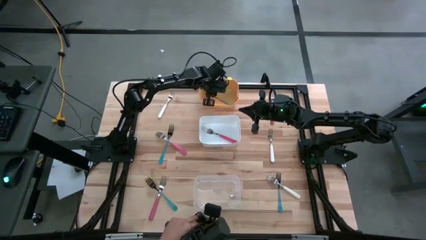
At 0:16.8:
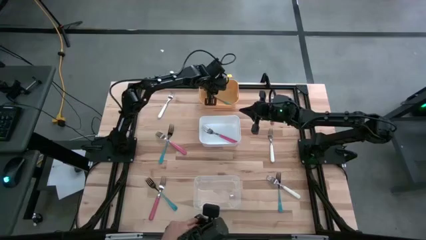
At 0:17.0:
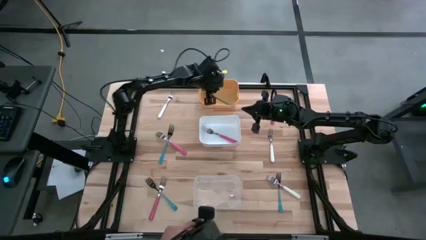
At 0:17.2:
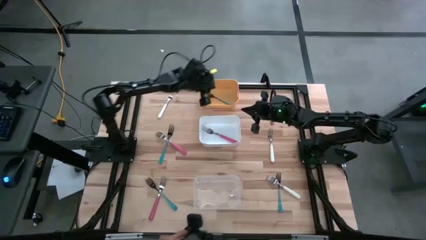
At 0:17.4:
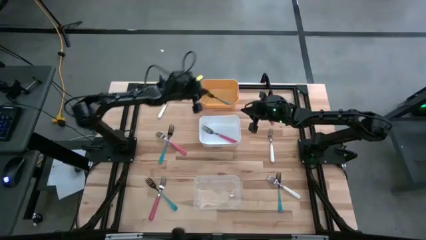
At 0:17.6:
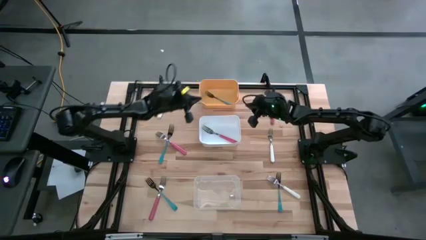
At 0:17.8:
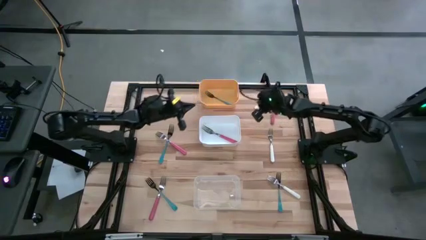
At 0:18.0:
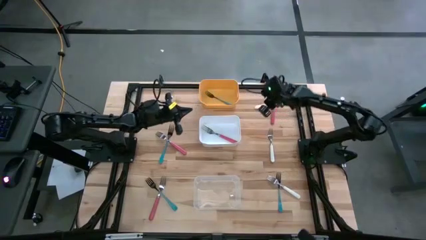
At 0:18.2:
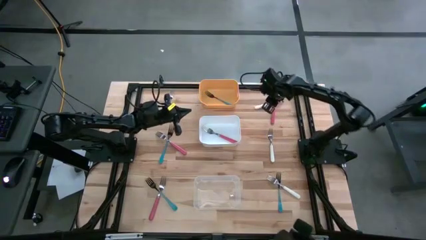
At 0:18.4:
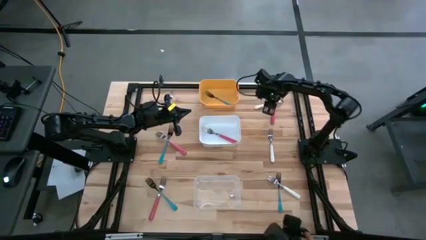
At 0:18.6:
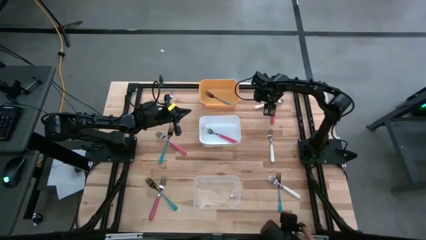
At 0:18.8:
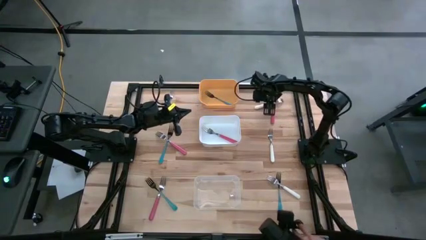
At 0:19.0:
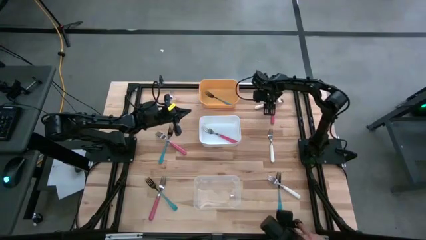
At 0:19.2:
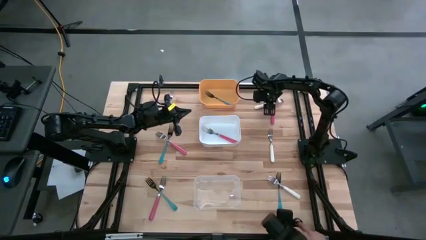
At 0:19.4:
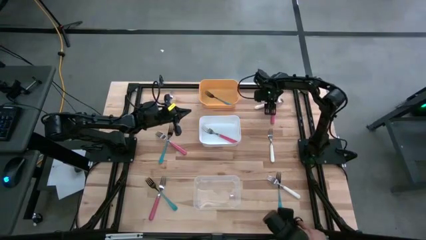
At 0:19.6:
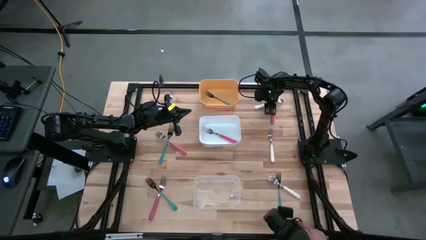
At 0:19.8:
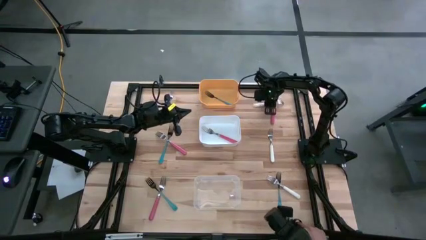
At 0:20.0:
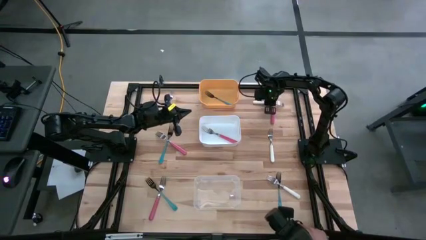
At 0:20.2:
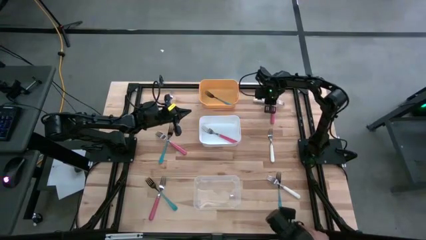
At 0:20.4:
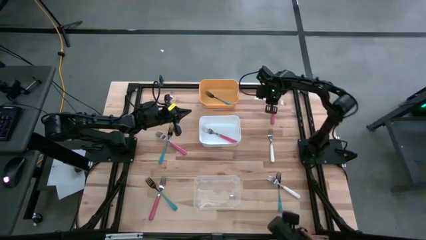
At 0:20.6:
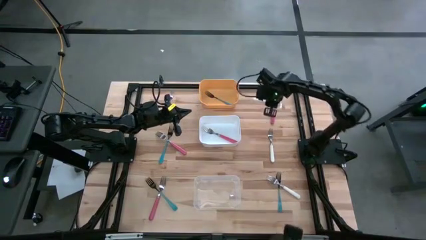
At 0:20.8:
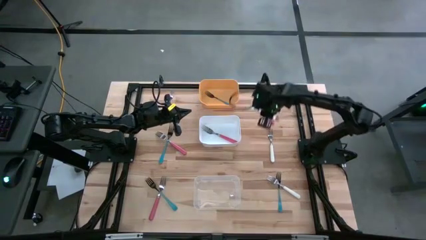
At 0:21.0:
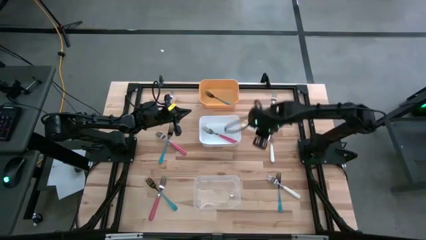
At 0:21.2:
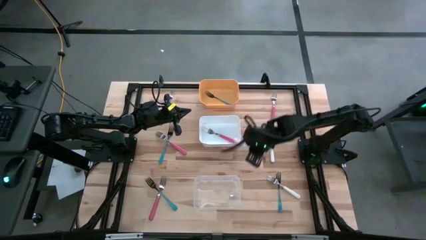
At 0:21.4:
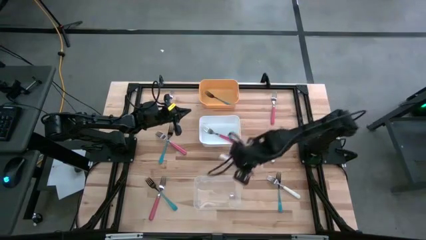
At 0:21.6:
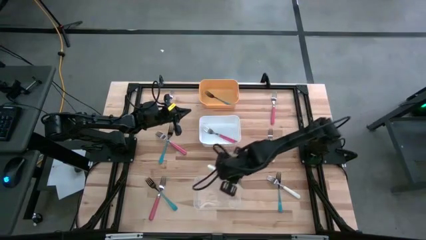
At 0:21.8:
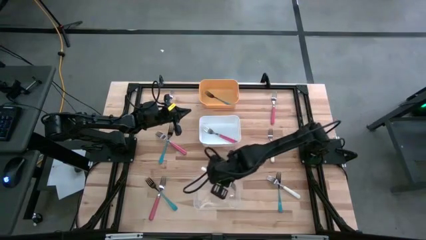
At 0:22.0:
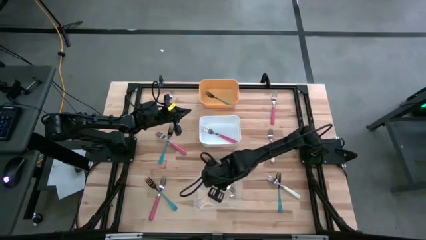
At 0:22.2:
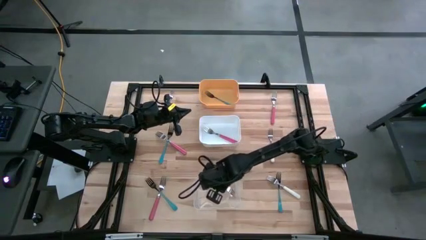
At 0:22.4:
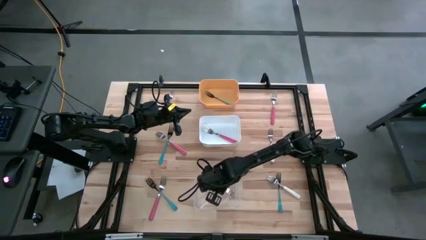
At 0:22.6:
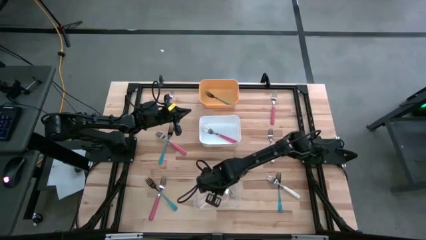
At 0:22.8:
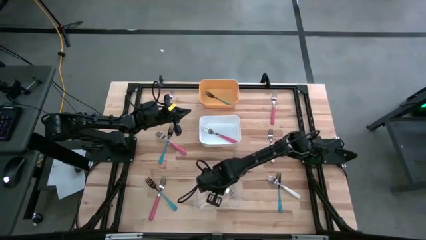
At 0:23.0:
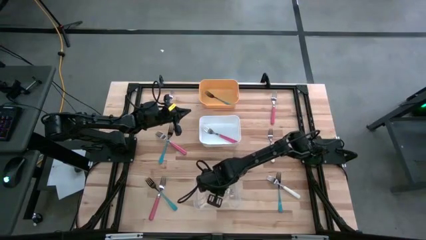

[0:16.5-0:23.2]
Task: Sort silverware by color (type)
Put the top right white fork into the transparent bin

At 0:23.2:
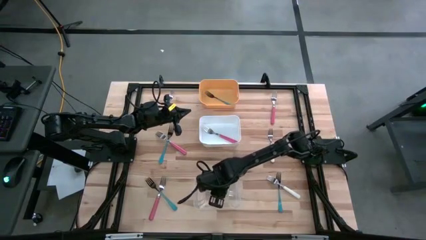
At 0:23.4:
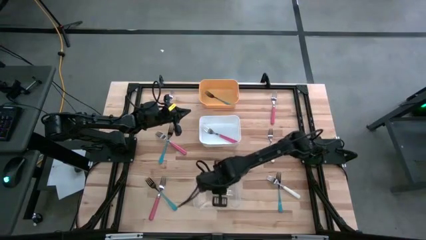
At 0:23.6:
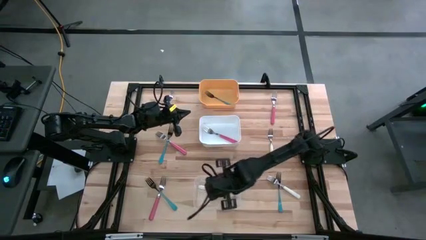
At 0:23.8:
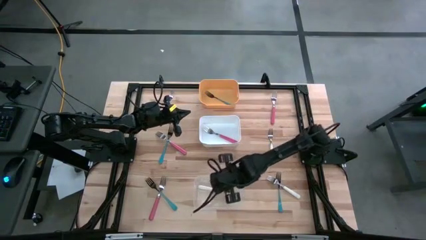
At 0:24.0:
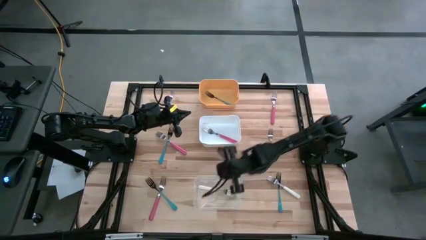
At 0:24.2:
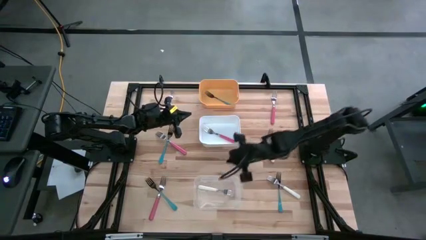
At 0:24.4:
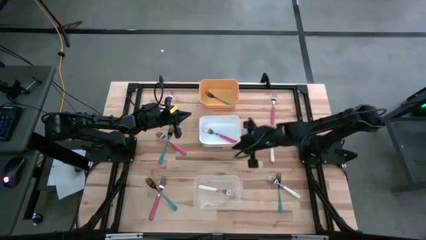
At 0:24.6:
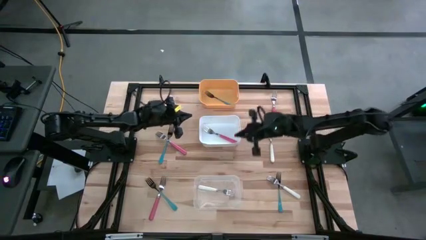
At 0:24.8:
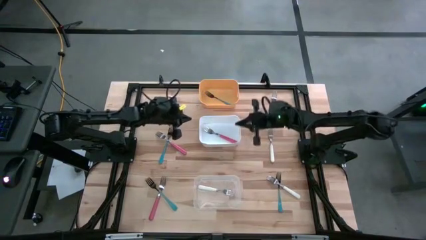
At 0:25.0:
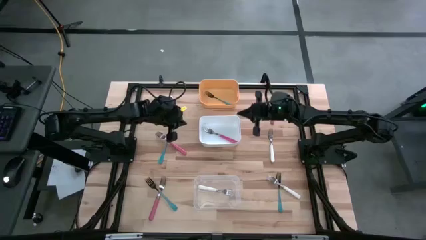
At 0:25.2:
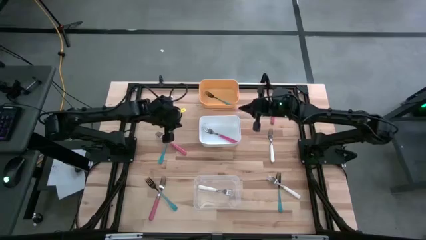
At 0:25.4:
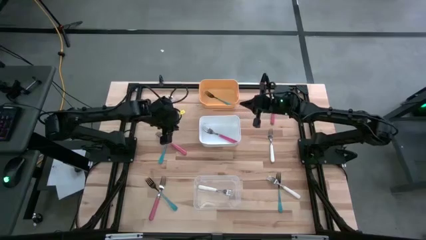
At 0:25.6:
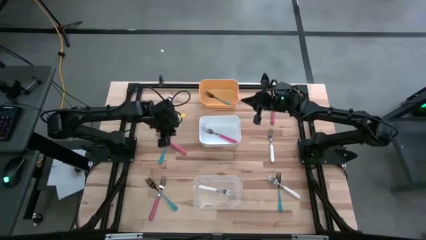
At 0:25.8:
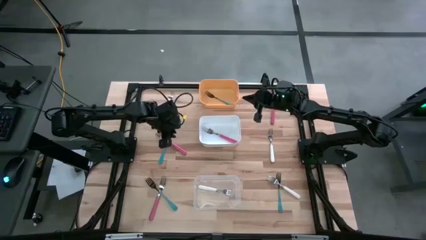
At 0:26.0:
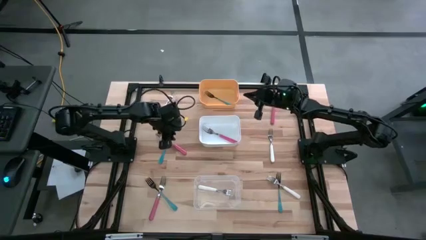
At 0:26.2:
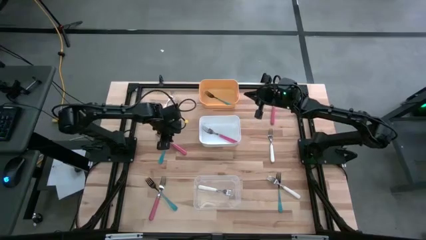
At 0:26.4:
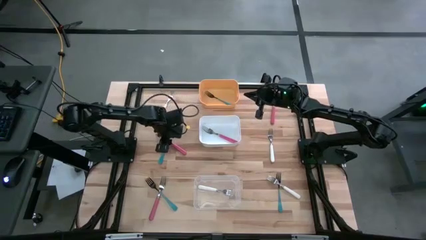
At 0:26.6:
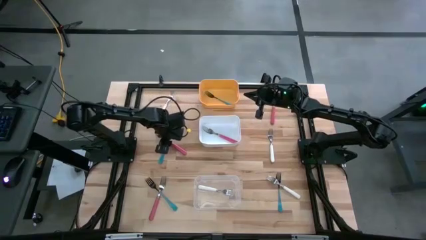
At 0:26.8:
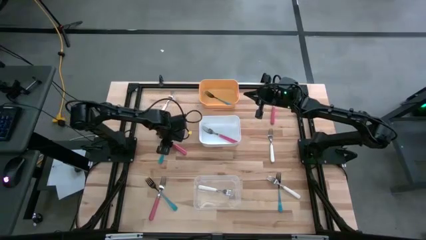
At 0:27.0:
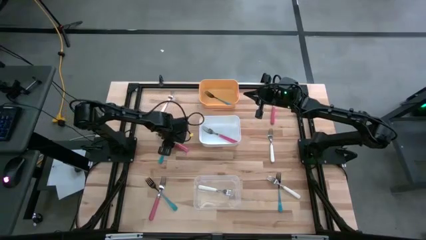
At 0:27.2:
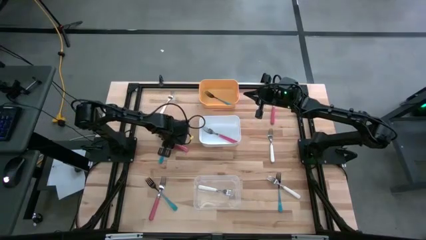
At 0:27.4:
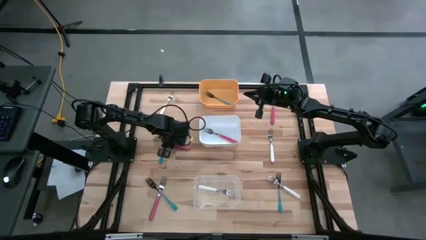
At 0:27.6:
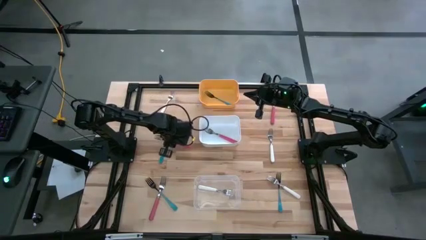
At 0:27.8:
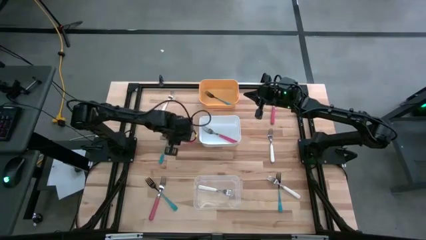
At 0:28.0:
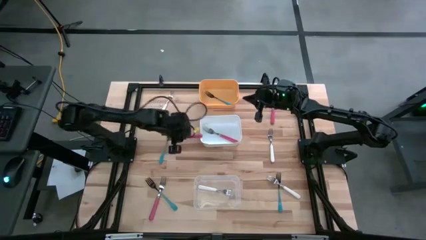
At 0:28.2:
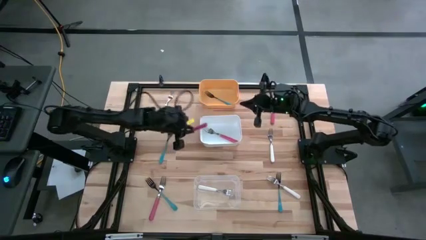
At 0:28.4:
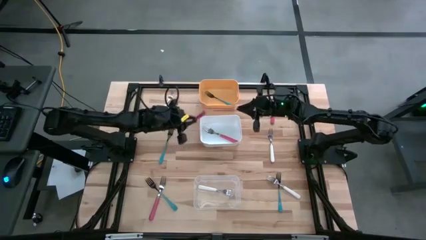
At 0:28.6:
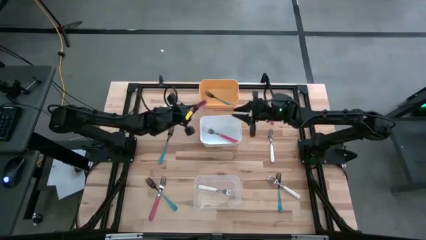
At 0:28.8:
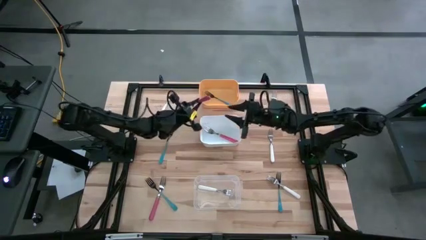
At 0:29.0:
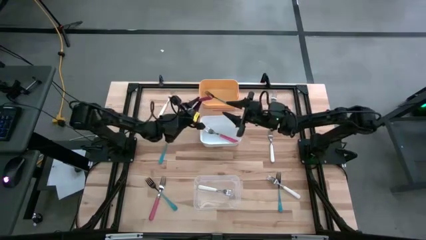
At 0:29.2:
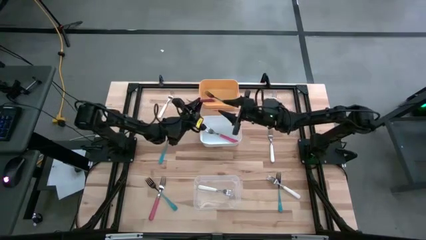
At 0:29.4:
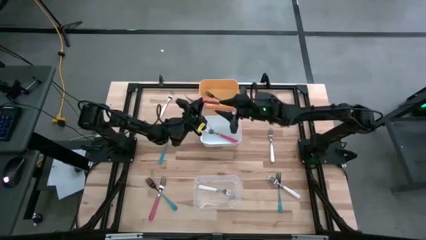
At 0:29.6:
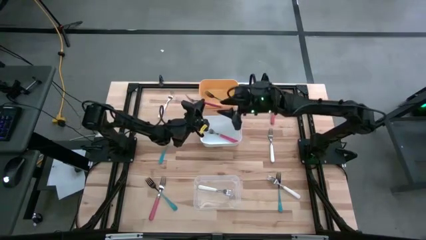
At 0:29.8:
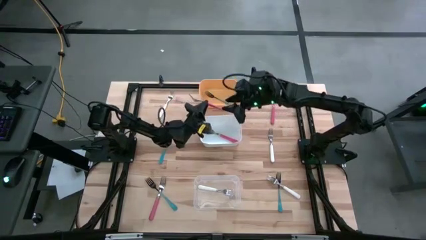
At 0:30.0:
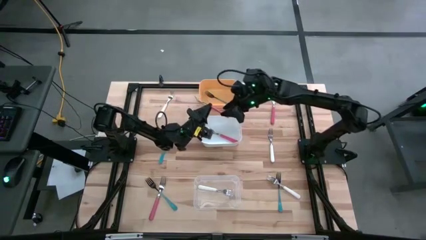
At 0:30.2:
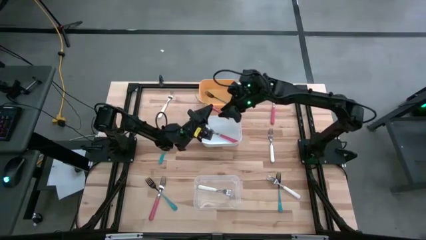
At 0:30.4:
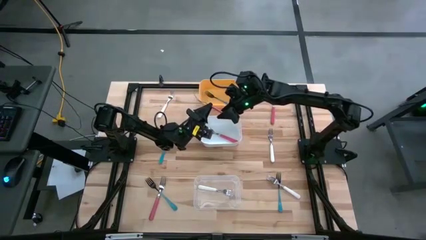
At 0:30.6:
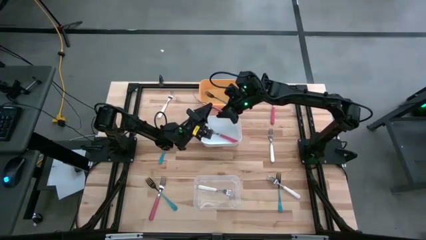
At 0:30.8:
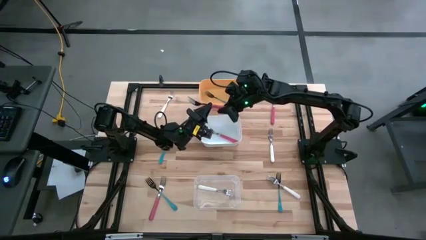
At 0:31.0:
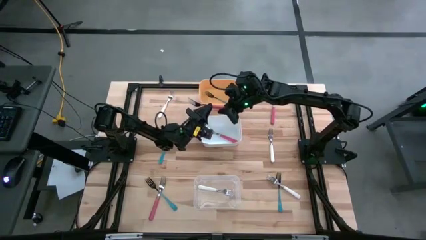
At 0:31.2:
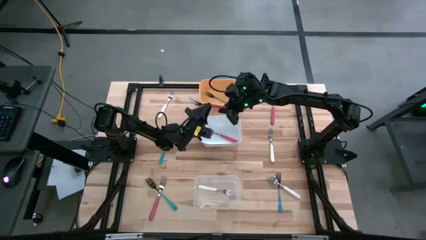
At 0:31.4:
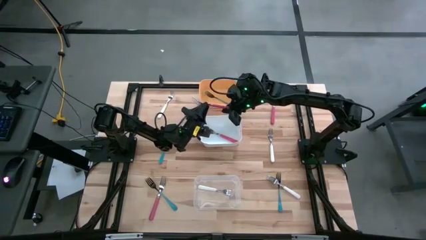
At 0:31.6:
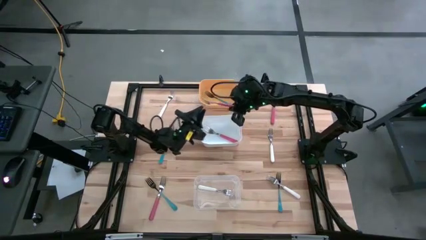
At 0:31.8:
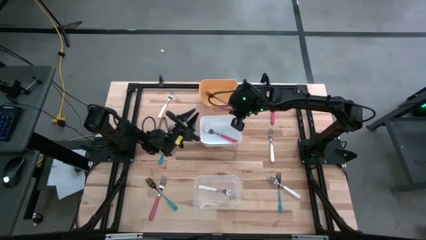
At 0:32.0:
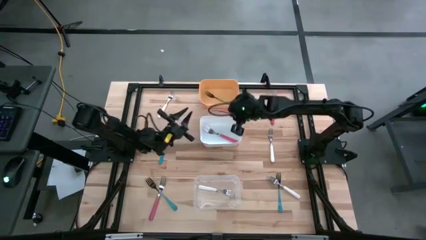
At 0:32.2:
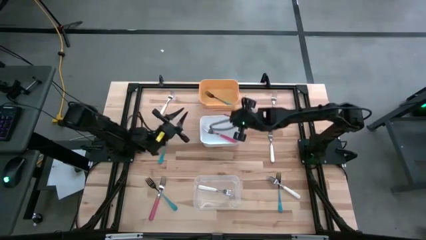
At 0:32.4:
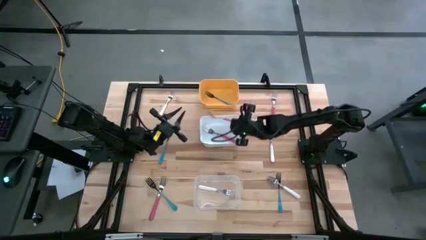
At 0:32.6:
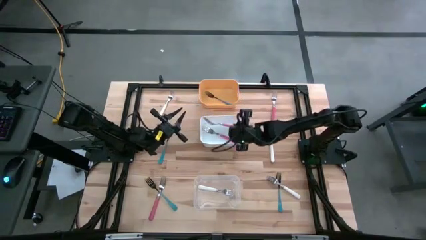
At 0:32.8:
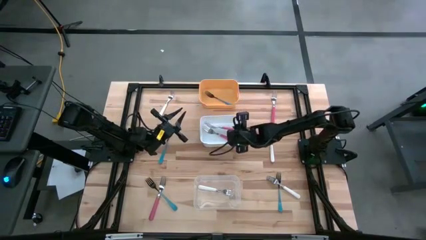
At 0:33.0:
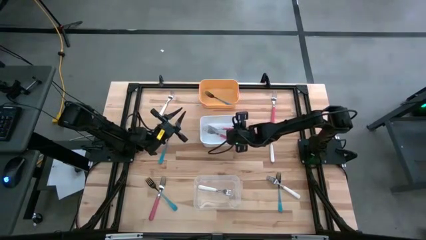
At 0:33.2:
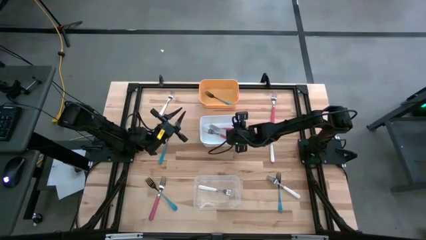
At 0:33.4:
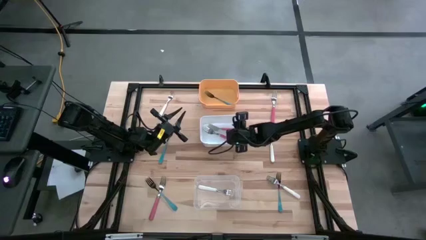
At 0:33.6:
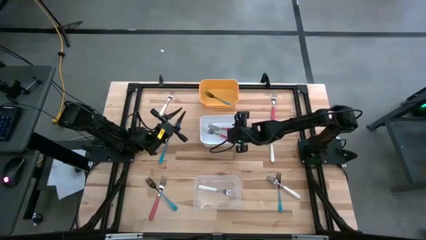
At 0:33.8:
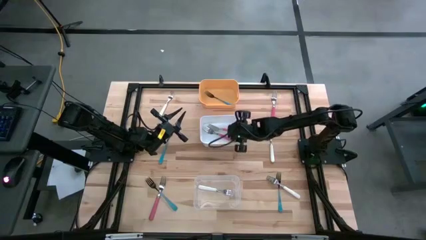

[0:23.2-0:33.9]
Put the middle left pink fork into the white bin
